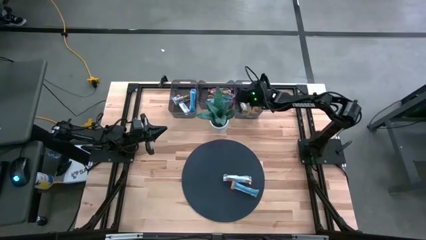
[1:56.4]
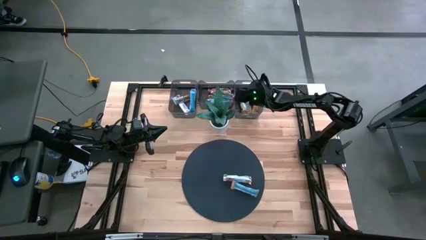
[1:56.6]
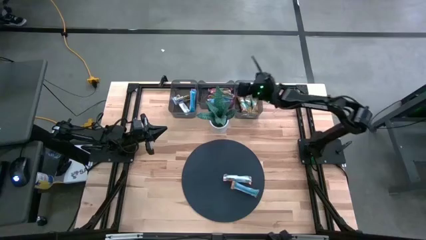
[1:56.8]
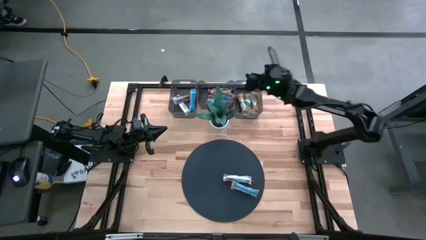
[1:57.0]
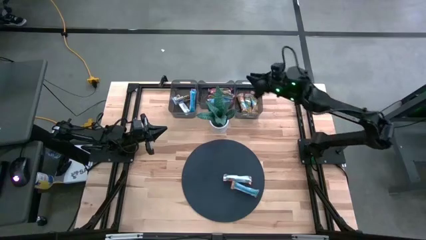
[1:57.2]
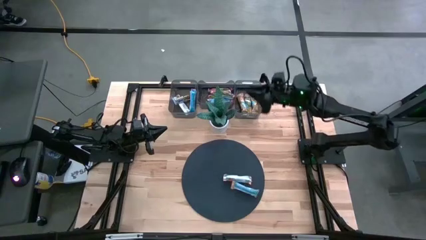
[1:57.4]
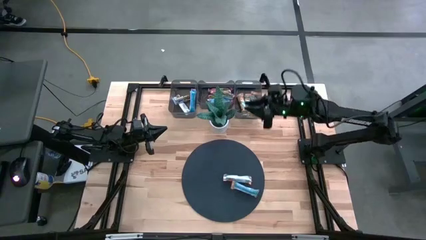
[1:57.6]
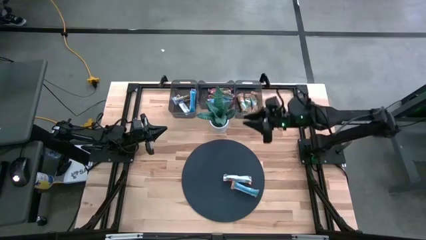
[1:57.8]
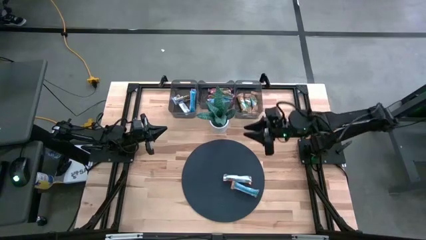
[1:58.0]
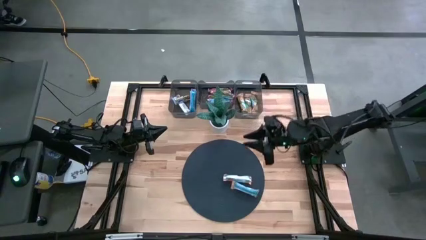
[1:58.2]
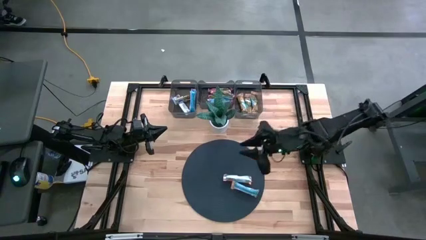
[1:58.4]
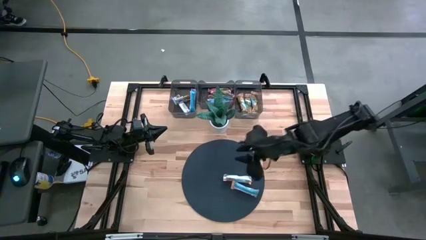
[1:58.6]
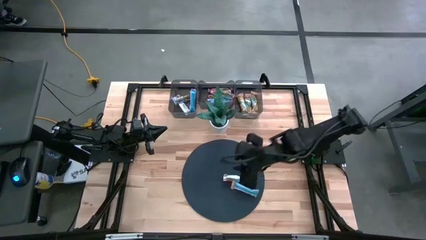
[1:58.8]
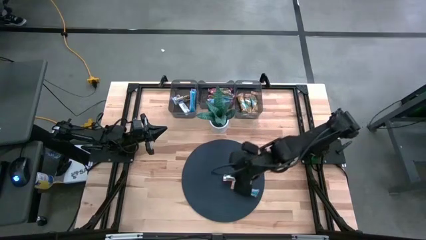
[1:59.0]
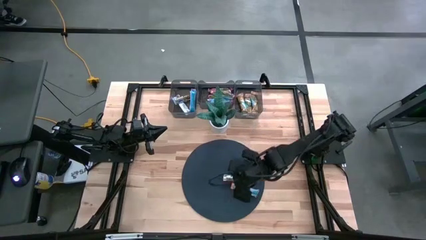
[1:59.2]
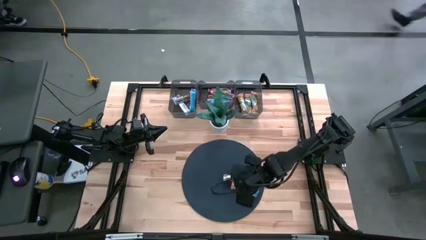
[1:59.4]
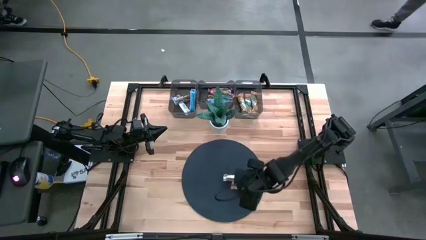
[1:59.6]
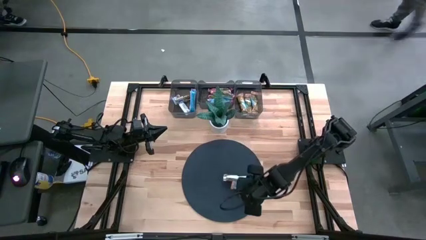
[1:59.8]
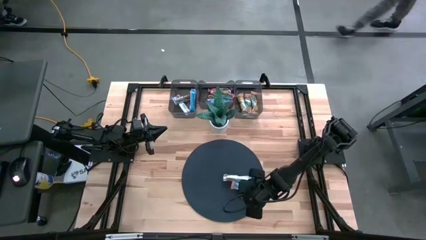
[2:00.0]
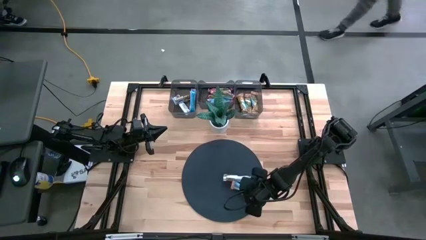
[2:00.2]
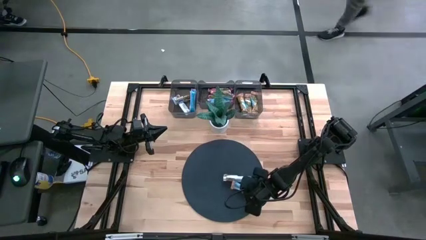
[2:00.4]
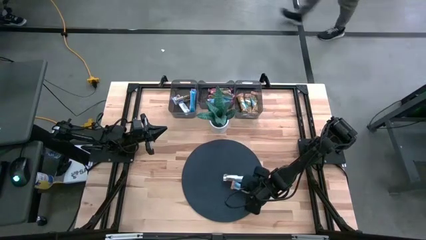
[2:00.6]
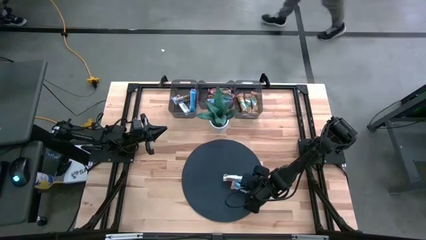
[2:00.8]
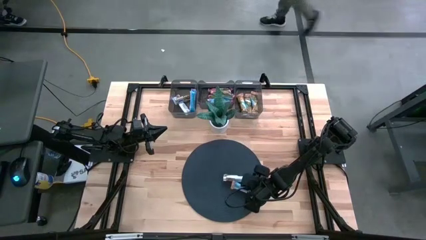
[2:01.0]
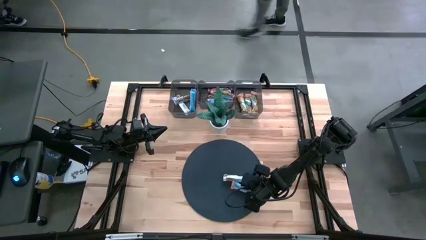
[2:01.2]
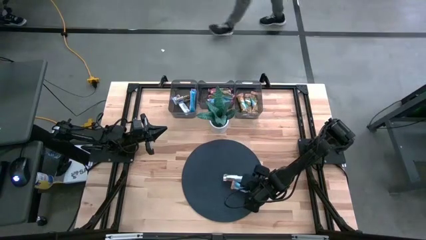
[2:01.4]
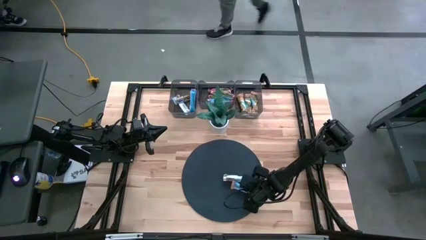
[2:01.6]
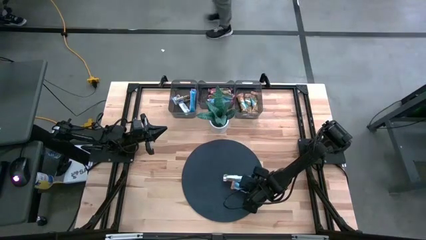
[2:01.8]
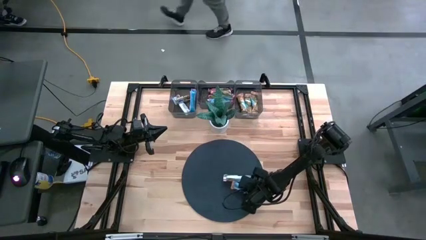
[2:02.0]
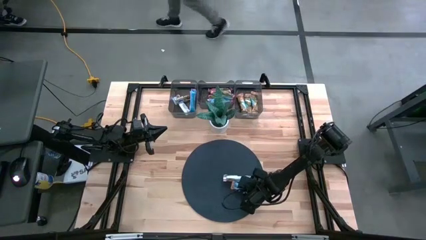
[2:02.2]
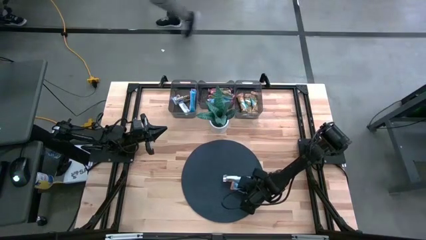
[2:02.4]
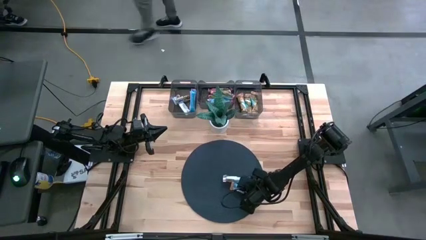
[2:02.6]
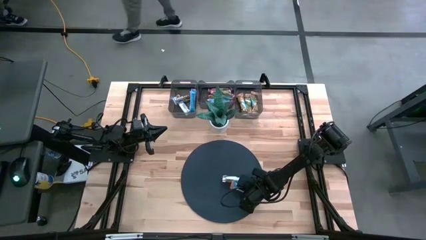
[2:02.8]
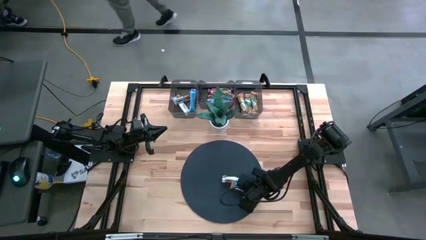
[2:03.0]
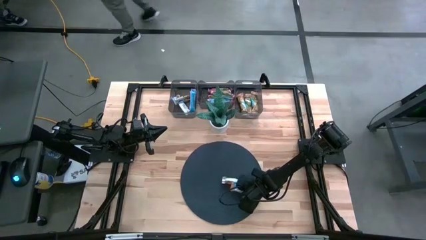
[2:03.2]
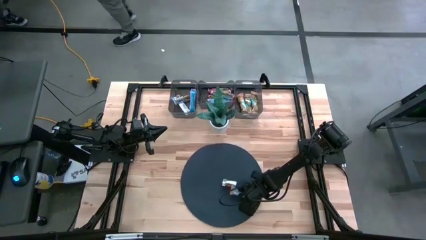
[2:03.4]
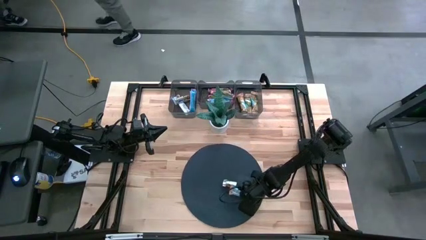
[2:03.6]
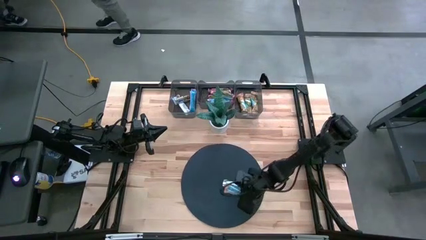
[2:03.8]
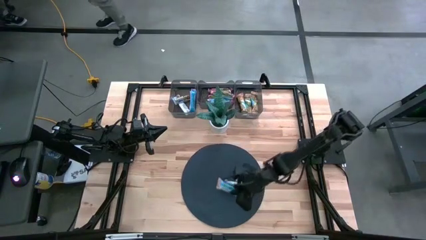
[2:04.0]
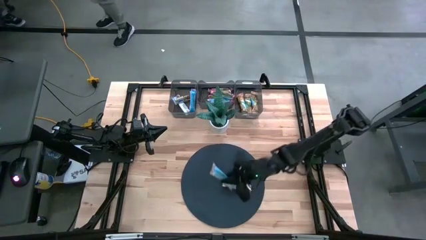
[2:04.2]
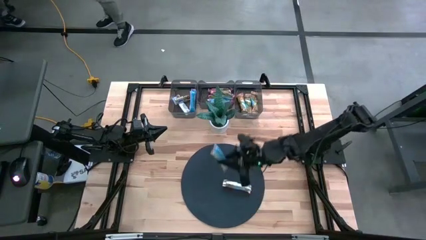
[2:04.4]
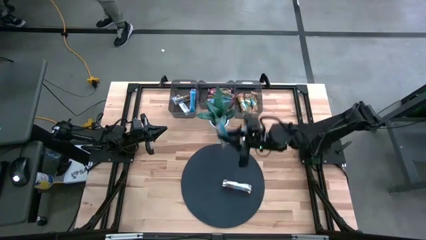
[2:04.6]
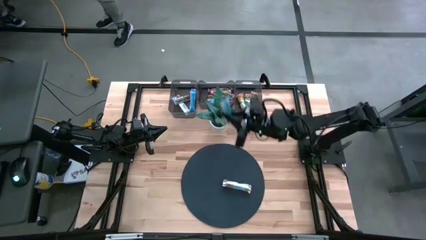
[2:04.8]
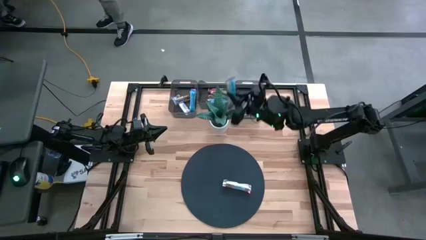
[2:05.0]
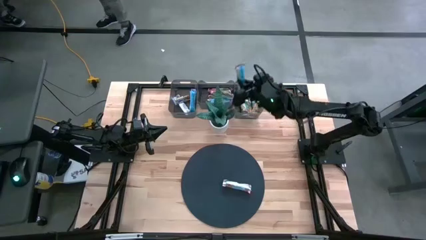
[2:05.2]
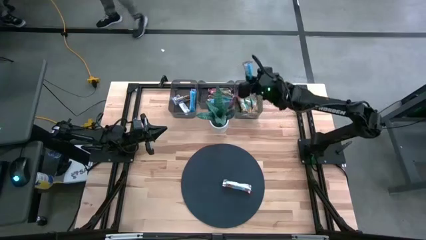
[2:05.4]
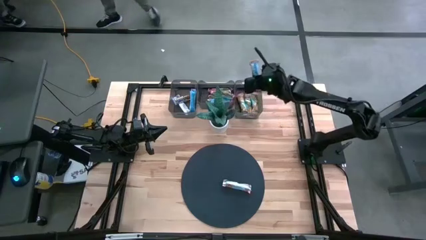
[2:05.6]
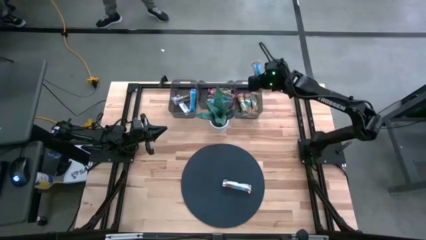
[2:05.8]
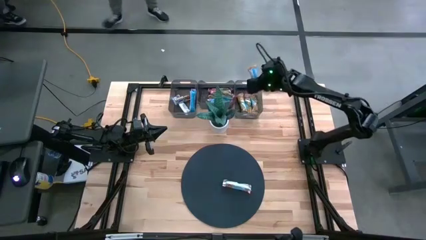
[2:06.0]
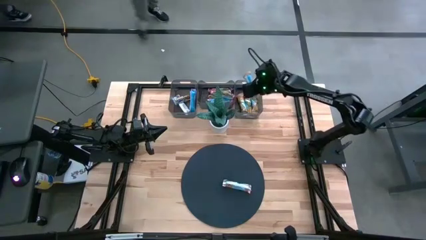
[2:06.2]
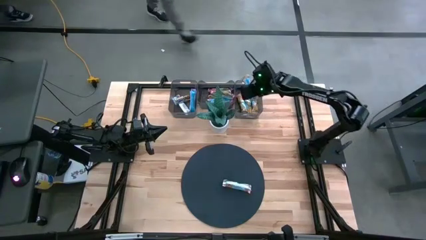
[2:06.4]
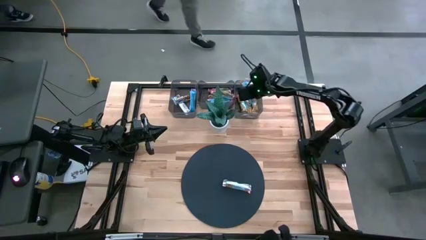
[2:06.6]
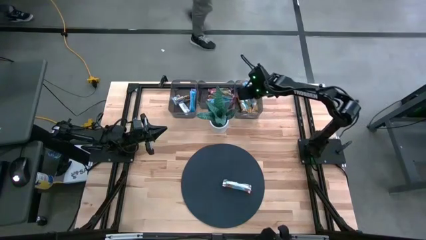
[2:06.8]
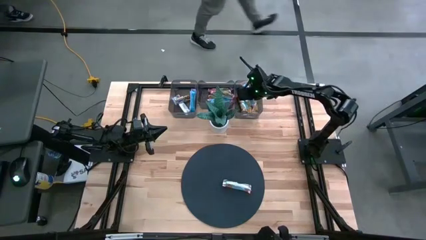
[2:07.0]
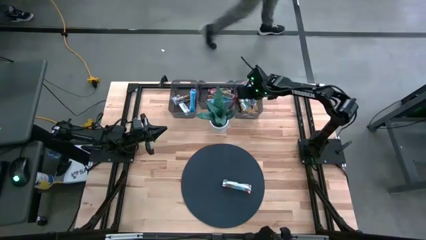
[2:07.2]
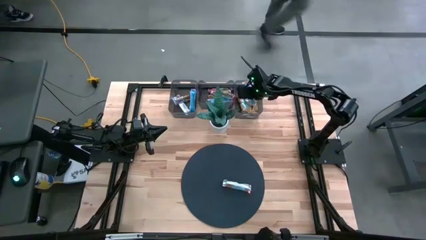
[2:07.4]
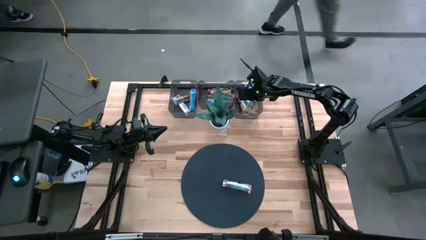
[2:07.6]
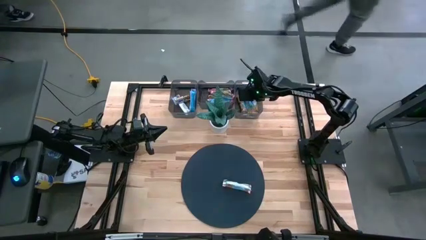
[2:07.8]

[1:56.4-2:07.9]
Task: Pick and place Granola Bars by type
Put the orange granola bar into the right black bin

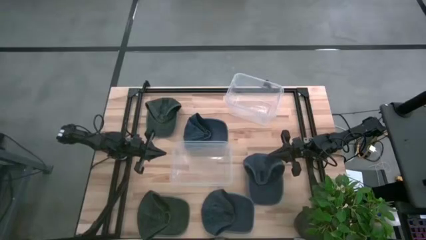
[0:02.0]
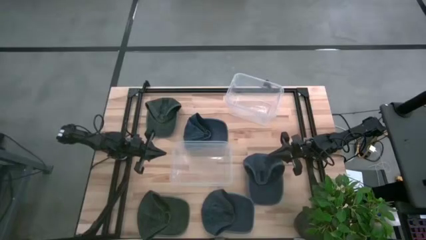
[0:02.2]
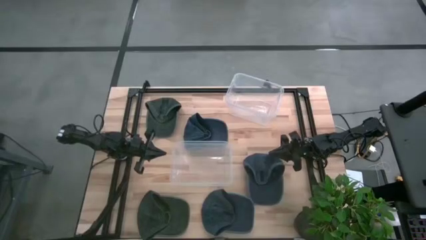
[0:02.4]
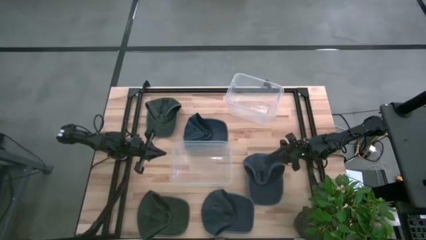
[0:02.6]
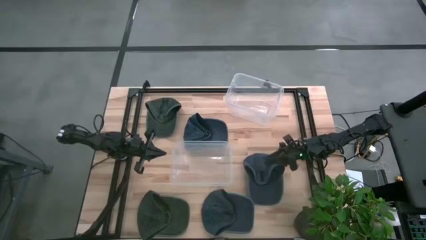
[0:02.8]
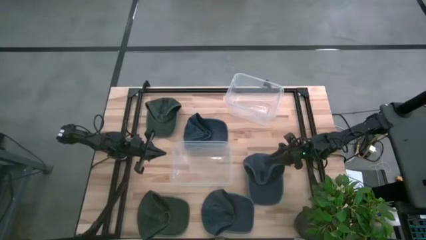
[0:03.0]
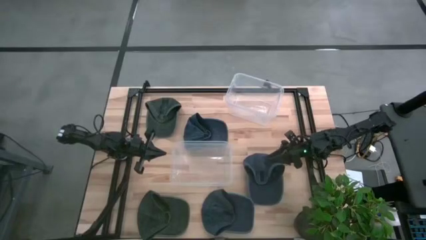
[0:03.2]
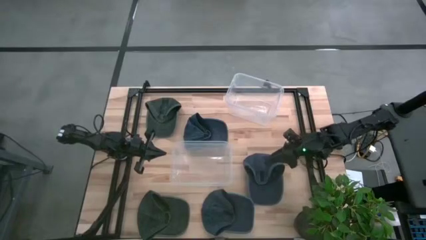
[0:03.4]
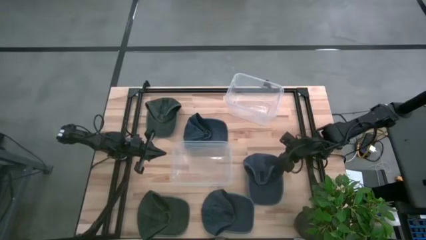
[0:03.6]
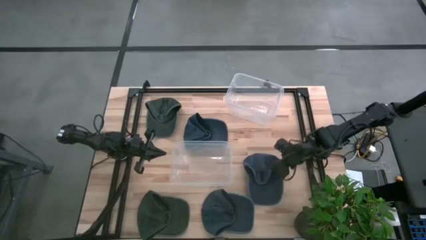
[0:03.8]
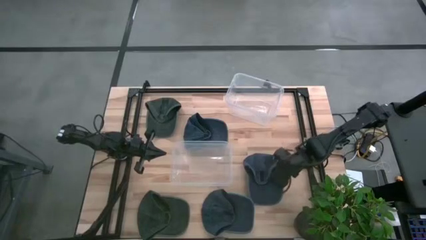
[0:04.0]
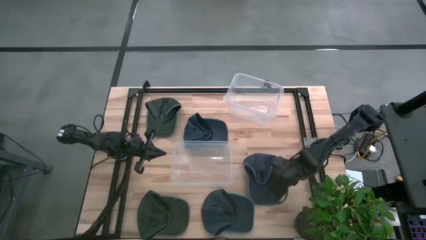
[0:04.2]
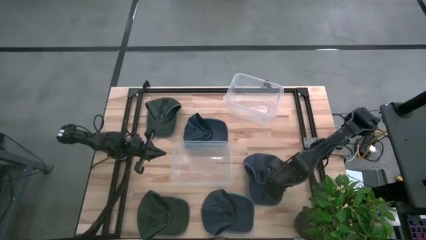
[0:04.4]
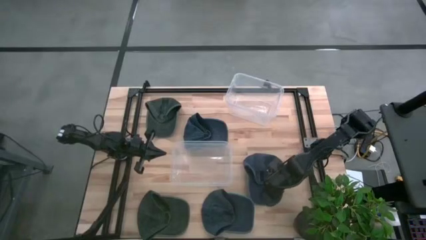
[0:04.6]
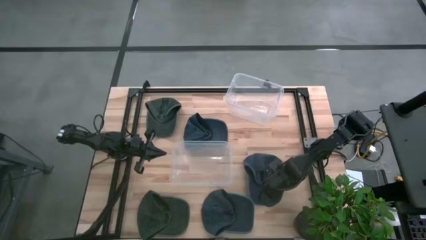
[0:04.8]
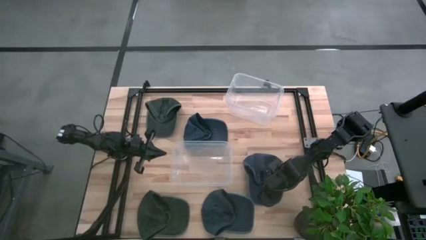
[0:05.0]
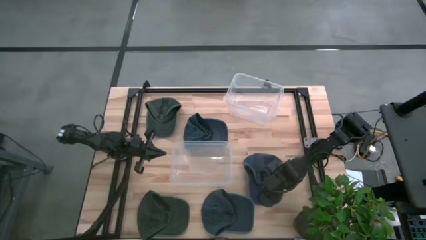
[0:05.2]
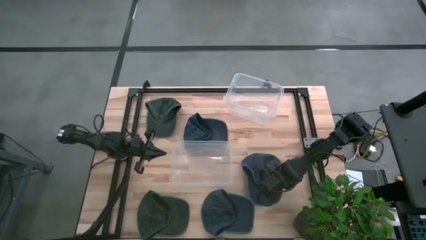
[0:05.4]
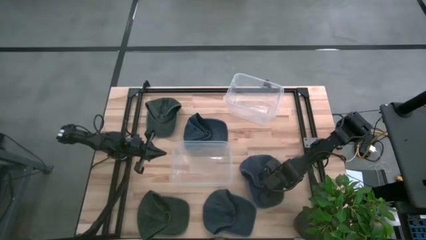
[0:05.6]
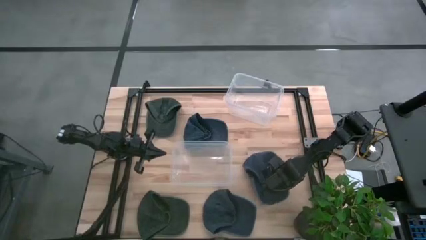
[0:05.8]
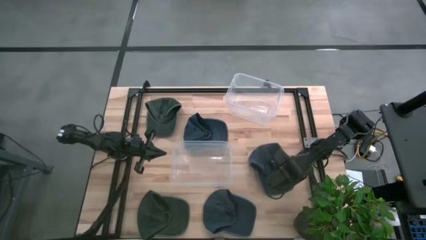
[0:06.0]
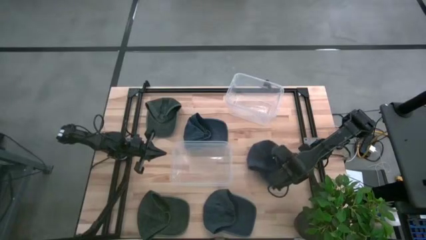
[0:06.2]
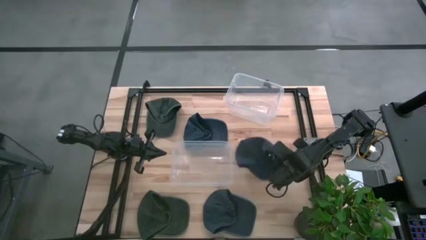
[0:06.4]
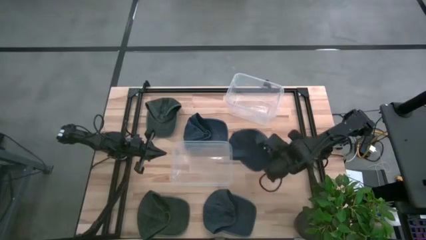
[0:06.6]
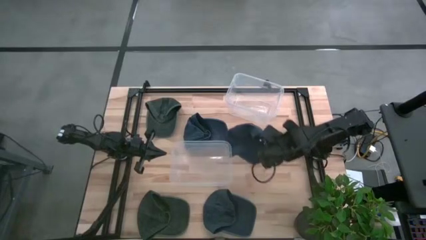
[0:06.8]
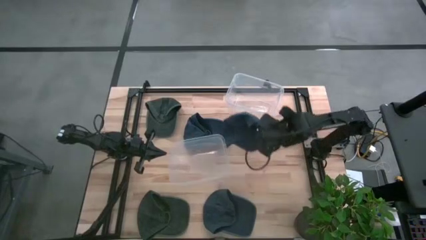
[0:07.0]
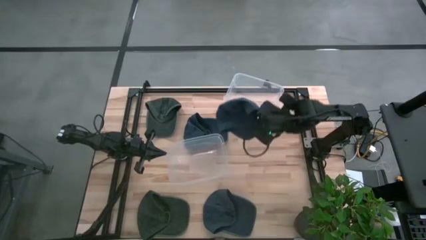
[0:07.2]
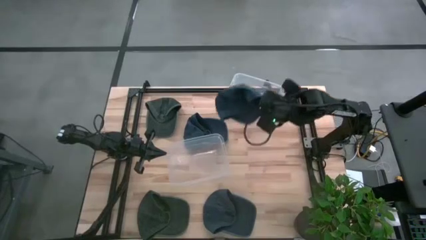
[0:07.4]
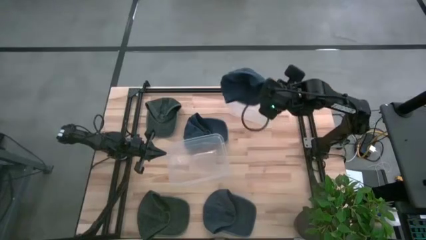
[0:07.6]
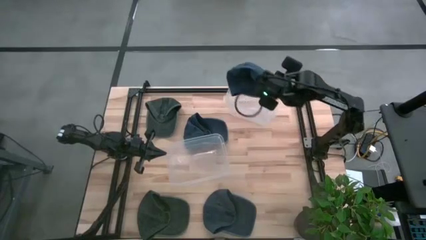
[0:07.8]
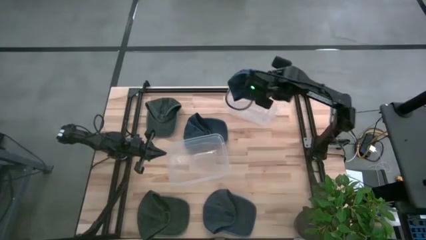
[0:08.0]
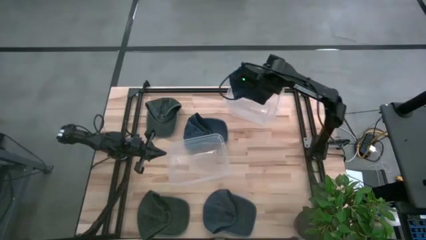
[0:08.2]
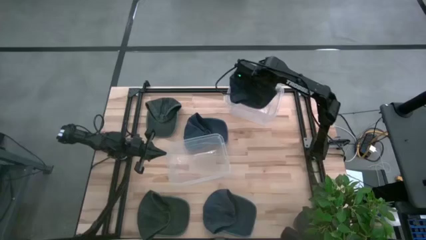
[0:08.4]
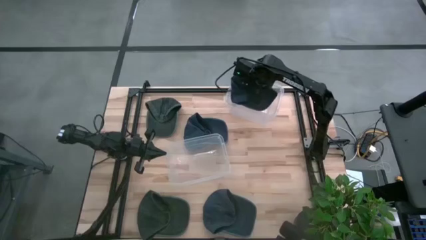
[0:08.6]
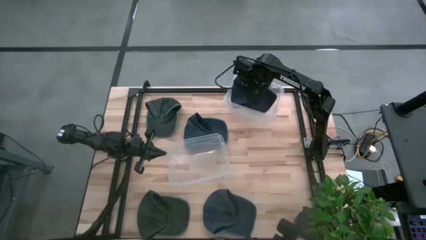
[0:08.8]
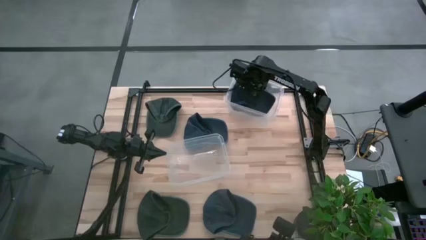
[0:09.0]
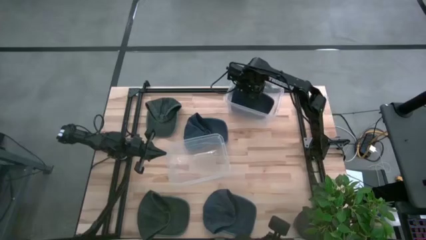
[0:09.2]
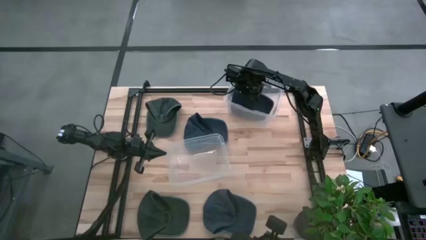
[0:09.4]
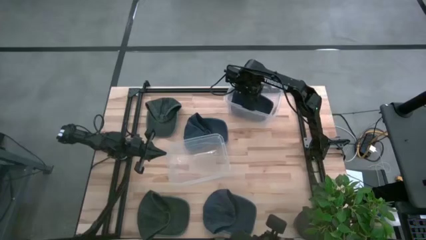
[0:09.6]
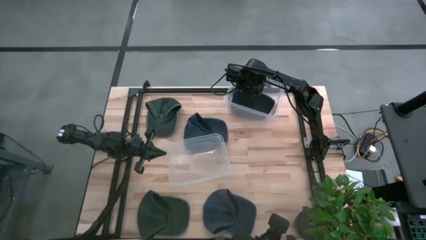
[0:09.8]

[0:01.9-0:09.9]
Task: Pick & Place hat
Put the middle blue cap into the top transparent bin
